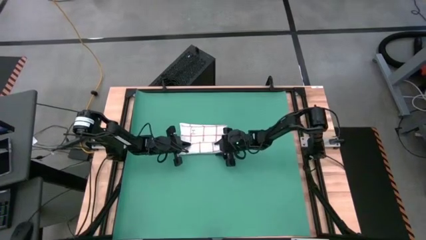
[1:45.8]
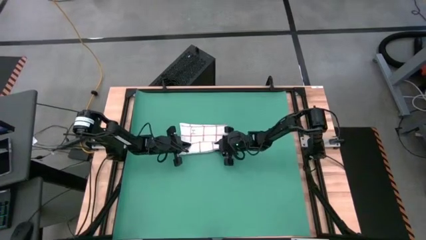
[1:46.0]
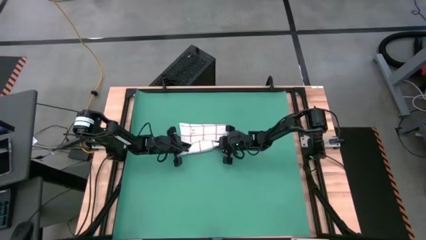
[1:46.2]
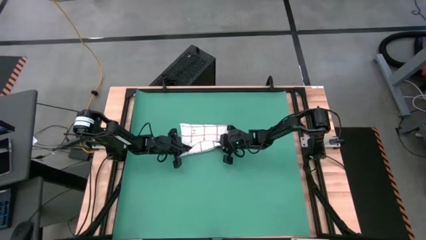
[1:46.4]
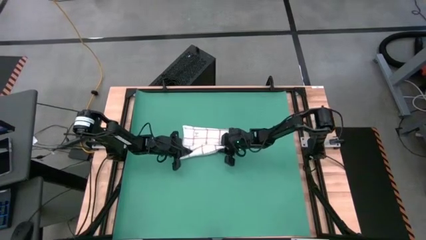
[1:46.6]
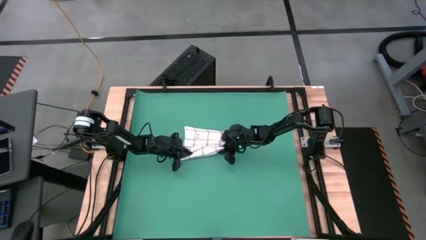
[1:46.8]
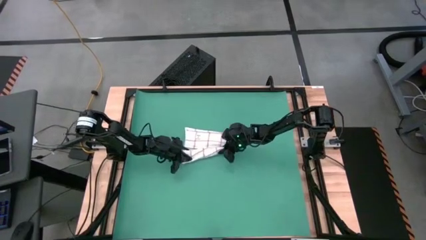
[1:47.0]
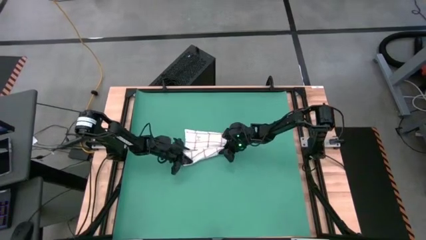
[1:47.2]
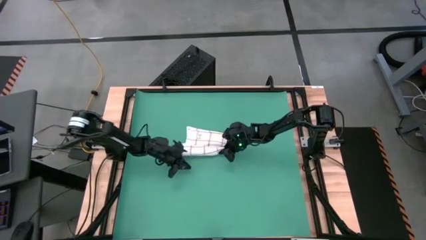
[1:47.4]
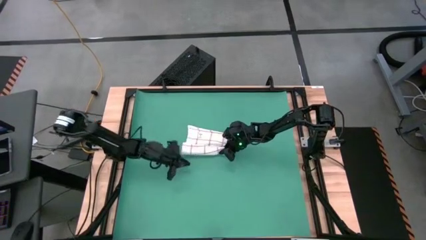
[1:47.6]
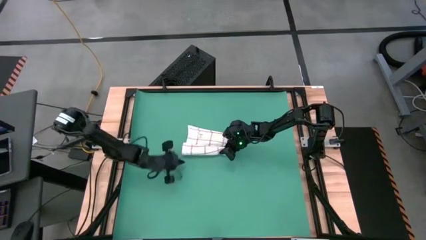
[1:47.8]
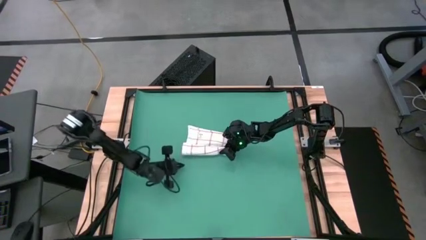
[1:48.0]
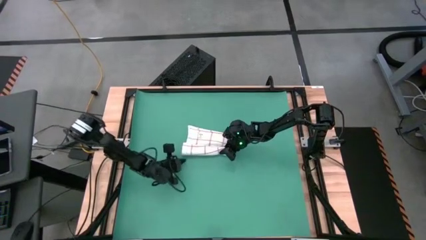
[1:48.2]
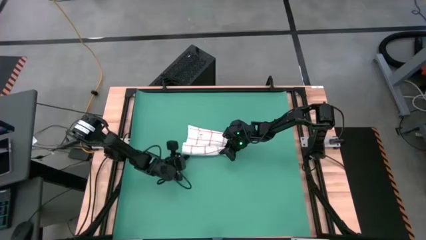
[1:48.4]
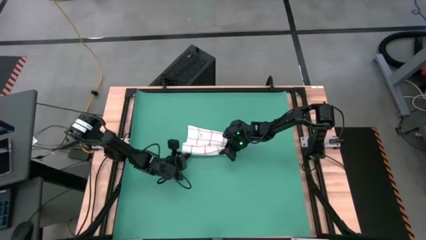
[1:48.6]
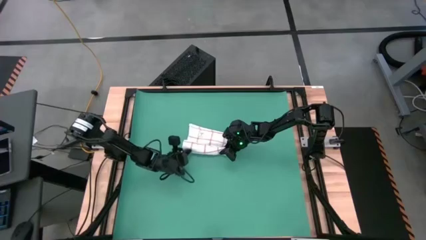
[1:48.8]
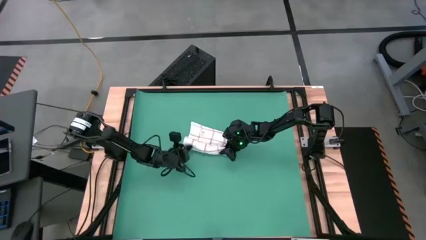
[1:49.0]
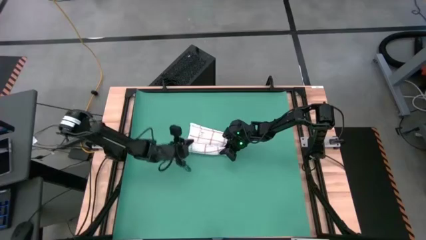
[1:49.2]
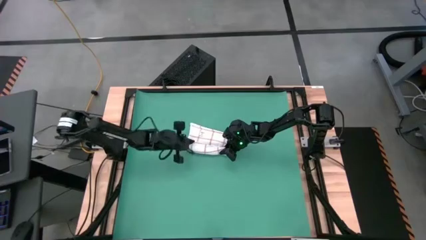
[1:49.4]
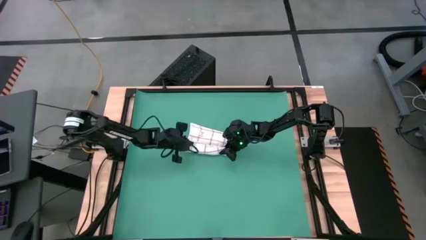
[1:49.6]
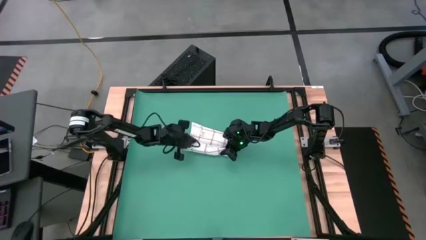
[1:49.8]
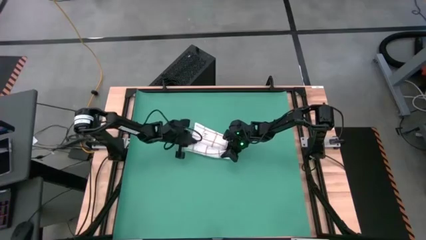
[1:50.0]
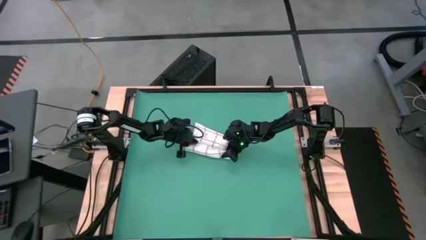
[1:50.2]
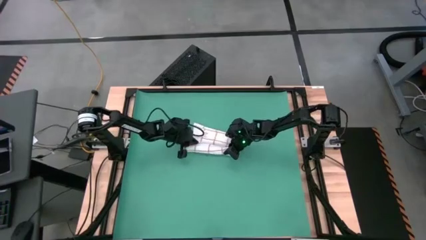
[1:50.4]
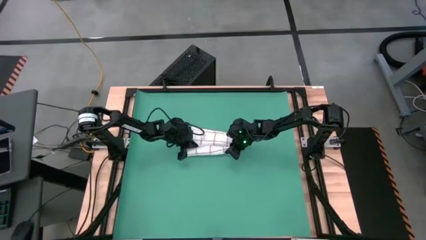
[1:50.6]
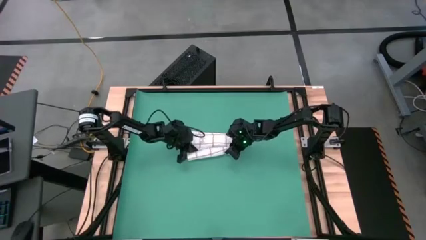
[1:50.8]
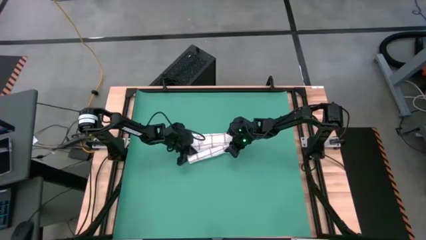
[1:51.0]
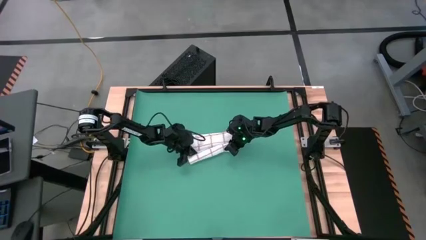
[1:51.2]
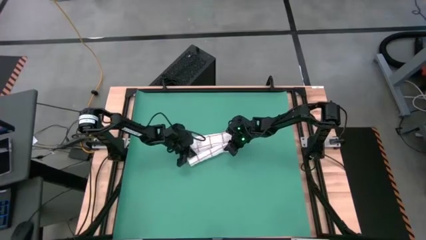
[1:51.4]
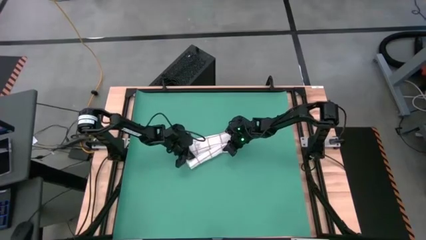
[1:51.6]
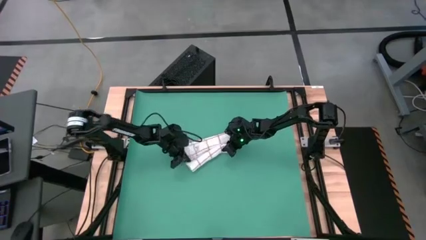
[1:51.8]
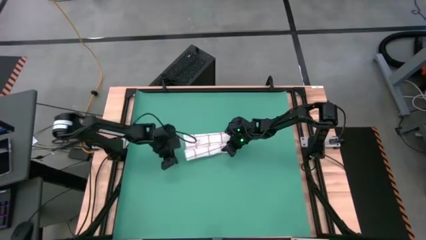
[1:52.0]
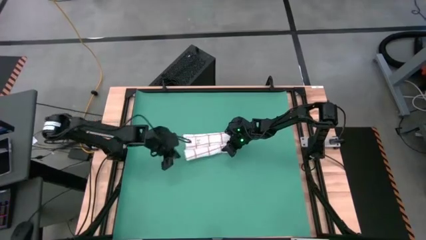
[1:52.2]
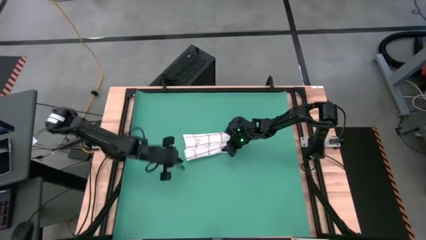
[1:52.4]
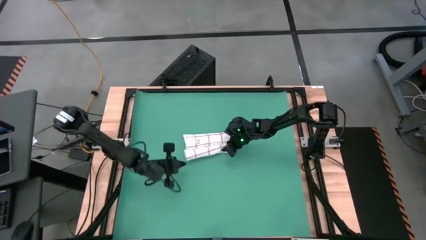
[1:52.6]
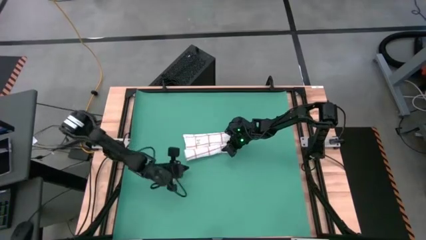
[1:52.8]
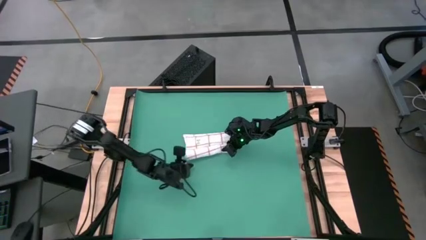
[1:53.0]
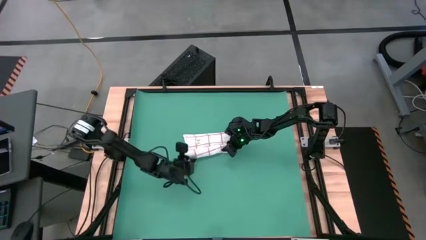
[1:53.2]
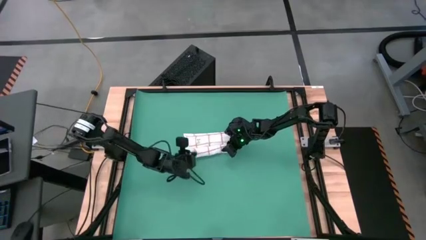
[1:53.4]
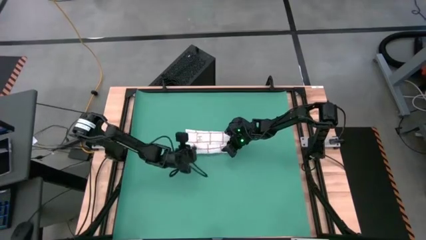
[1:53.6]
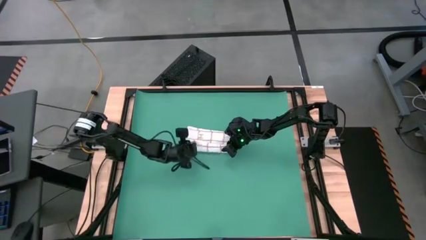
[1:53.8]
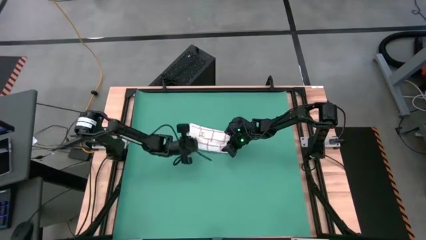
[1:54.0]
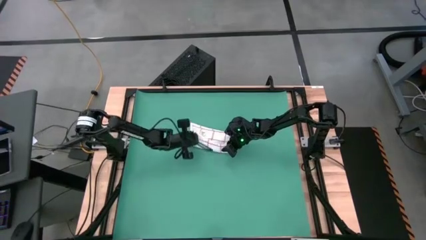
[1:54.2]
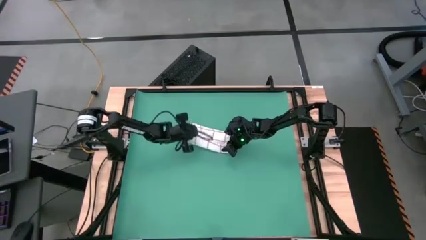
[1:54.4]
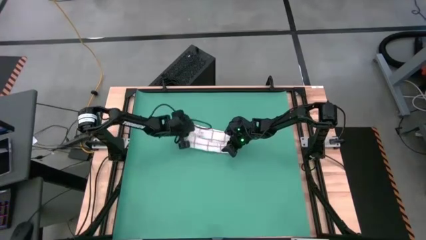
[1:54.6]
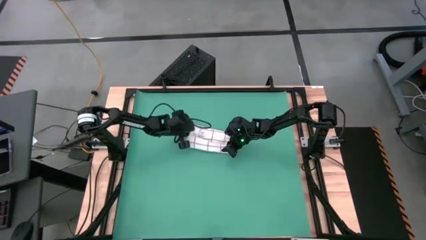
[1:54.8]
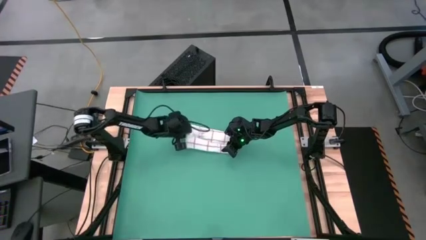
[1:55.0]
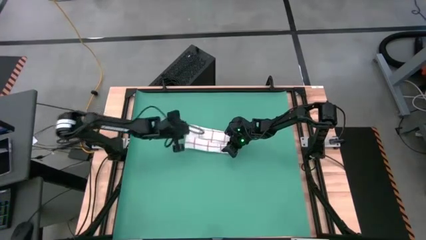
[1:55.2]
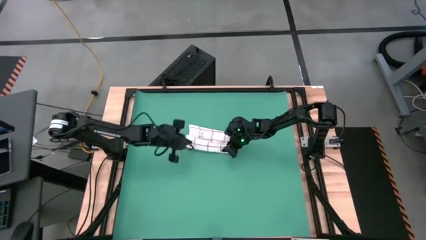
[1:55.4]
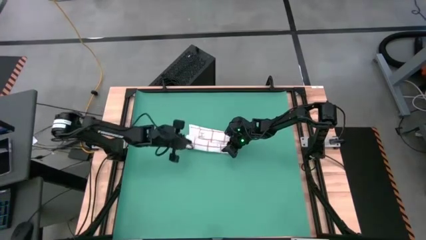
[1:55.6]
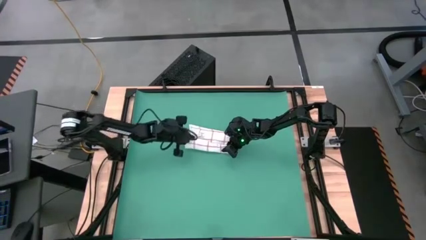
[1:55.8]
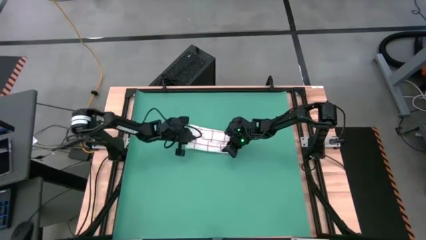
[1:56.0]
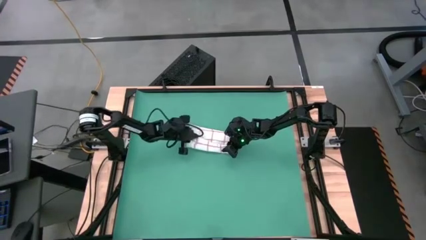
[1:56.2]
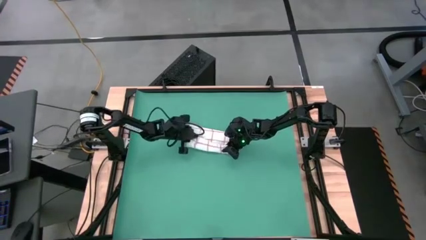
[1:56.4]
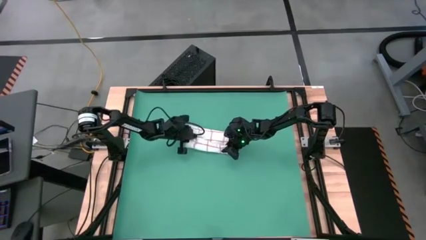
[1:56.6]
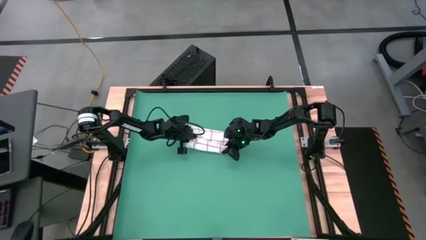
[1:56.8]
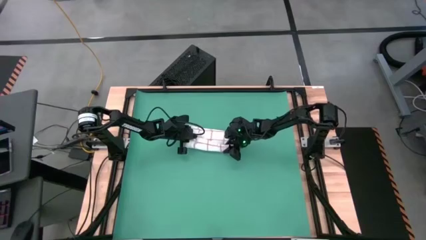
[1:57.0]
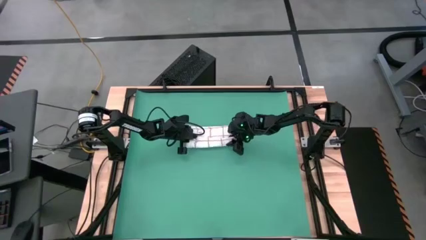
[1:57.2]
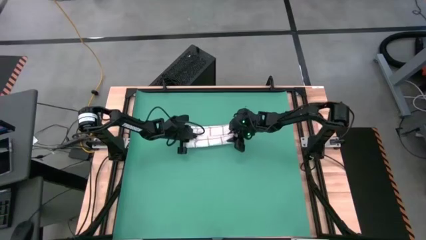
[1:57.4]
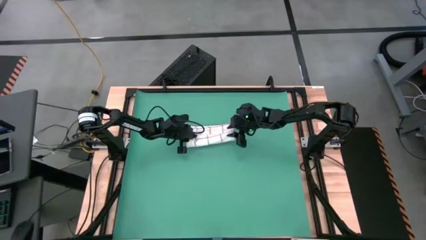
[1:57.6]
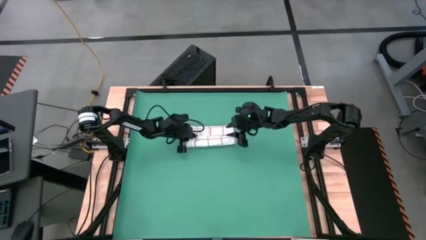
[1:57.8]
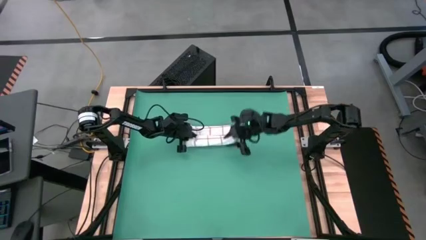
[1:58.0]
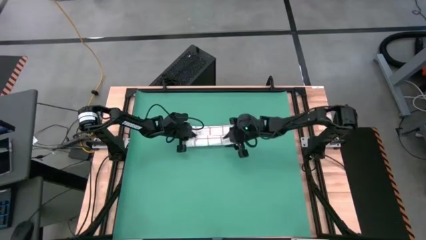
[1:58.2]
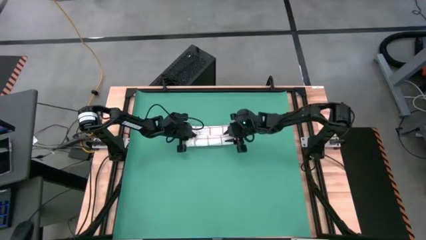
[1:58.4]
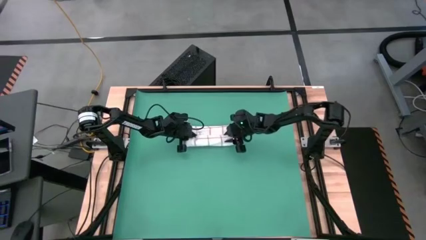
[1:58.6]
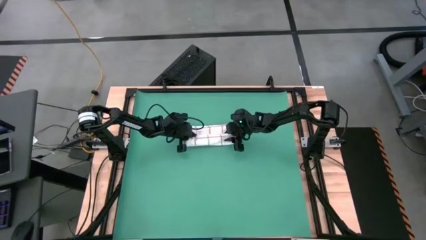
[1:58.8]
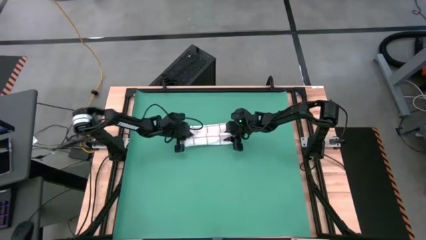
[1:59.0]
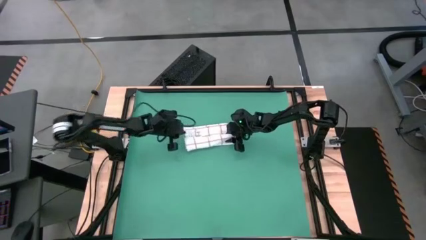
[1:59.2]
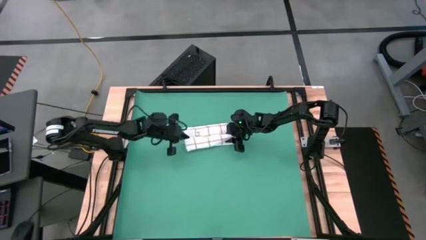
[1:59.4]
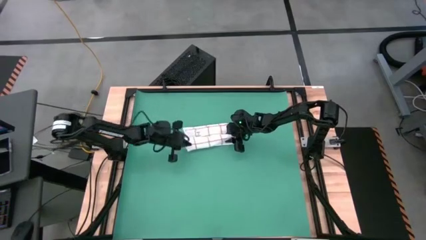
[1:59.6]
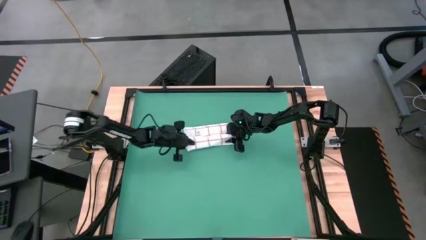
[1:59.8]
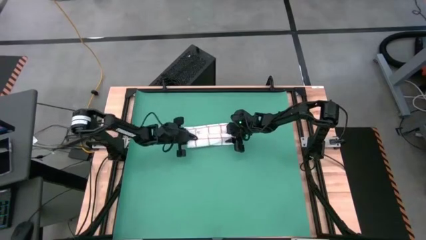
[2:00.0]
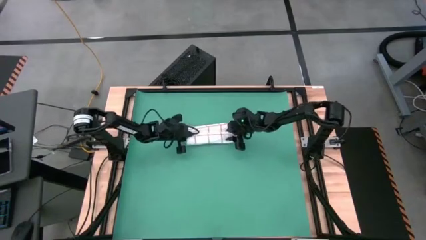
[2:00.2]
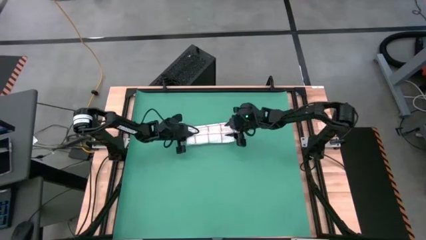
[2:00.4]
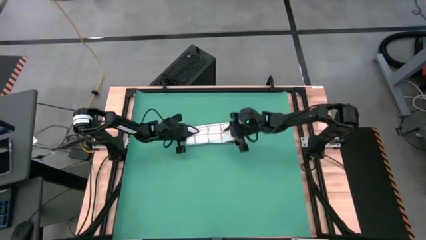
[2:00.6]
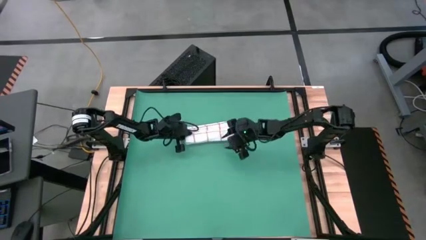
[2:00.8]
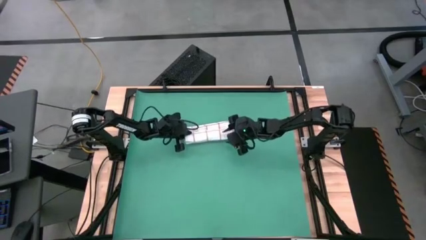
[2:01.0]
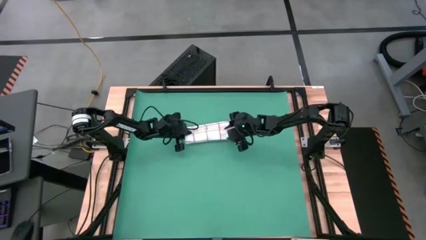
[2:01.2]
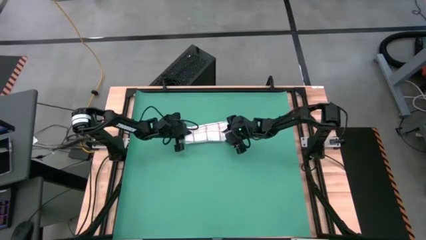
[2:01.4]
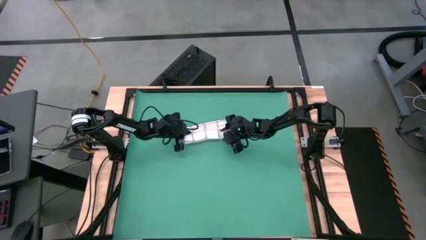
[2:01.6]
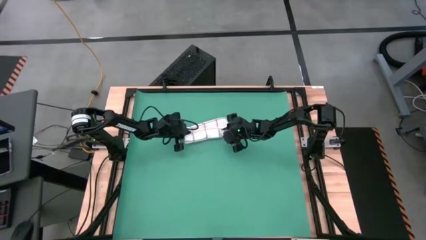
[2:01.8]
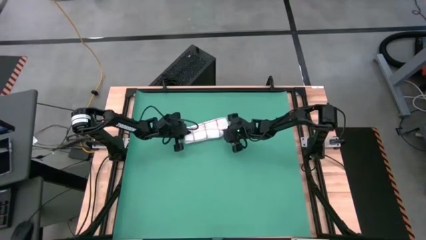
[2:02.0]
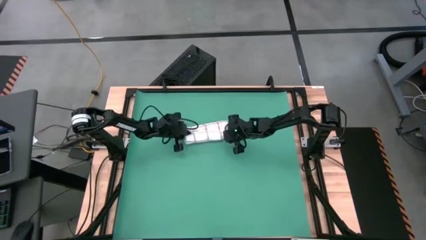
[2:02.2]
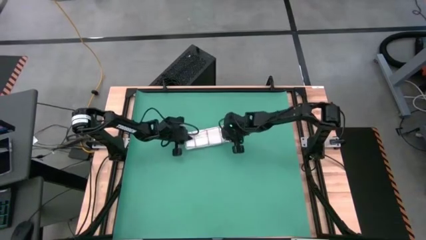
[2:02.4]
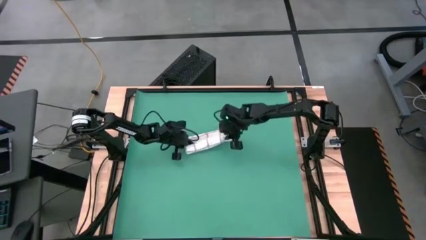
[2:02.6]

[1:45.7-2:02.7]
Task: Roll towel
Roll the white towel
